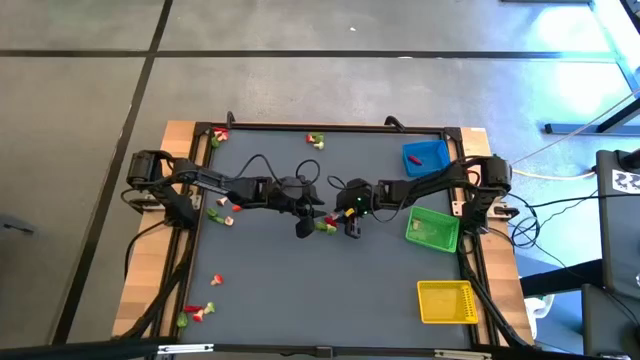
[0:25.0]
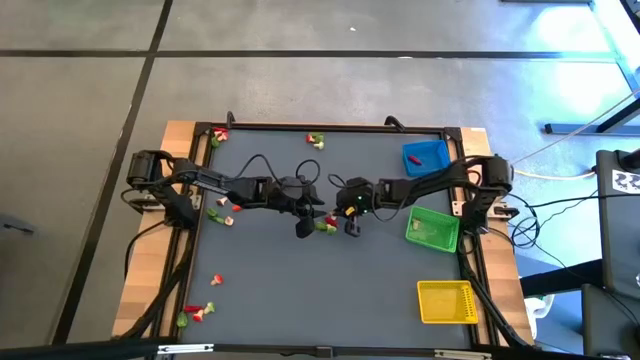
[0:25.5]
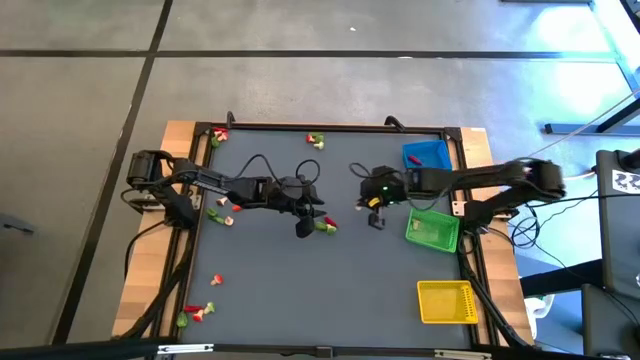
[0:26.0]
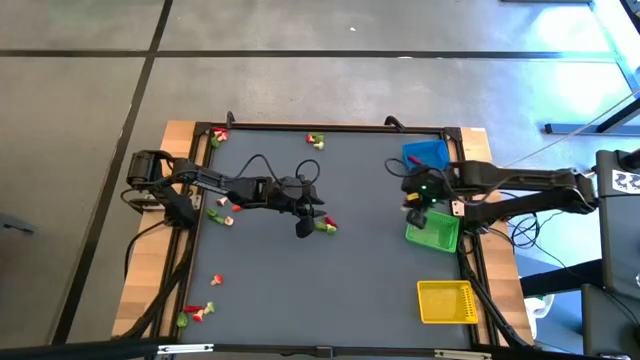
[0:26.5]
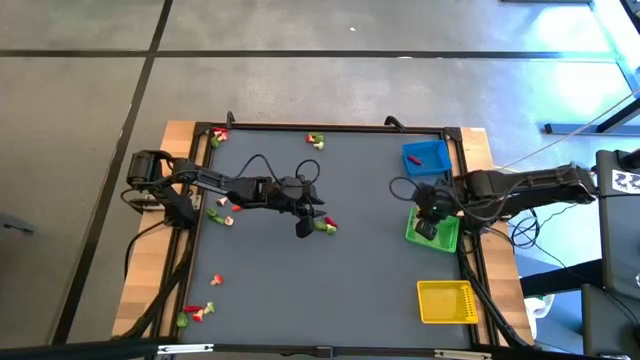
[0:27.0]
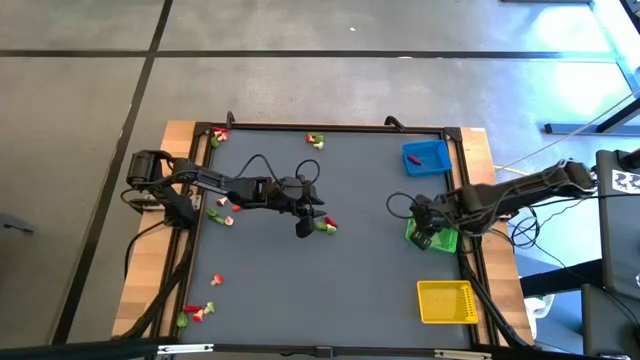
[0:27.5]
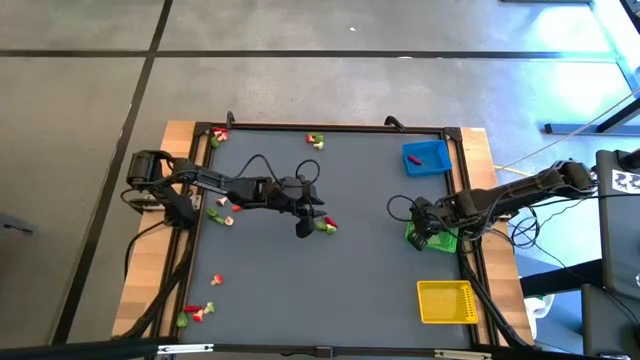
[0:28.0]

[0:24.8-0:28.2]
Task: Sort produce into baskets
Put the brown mushroom into the green basket

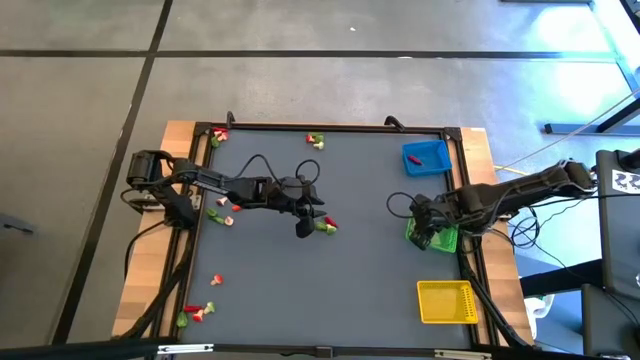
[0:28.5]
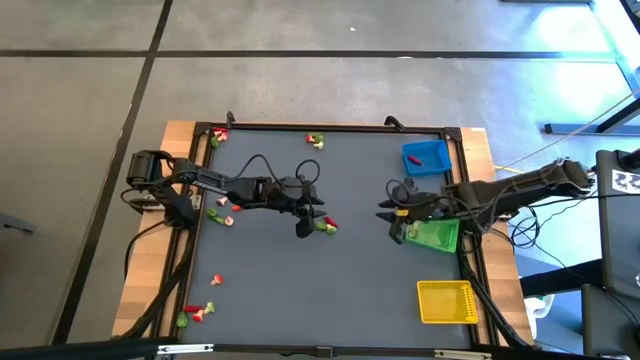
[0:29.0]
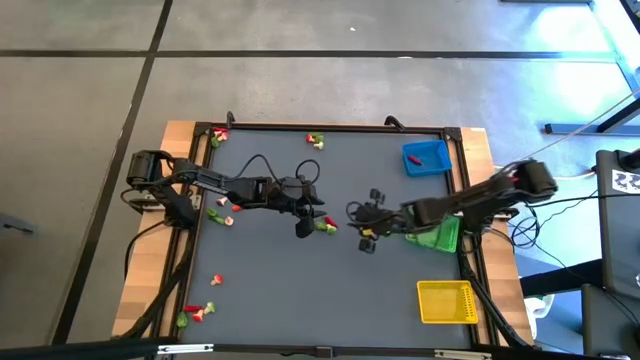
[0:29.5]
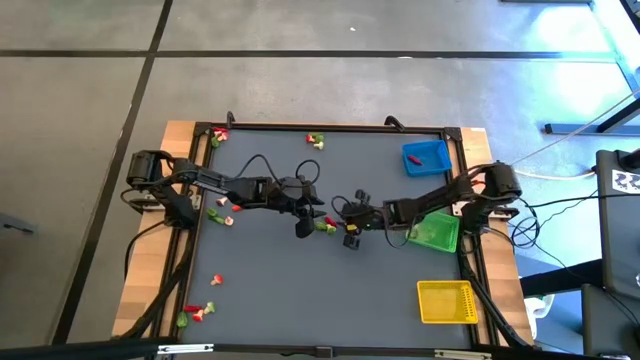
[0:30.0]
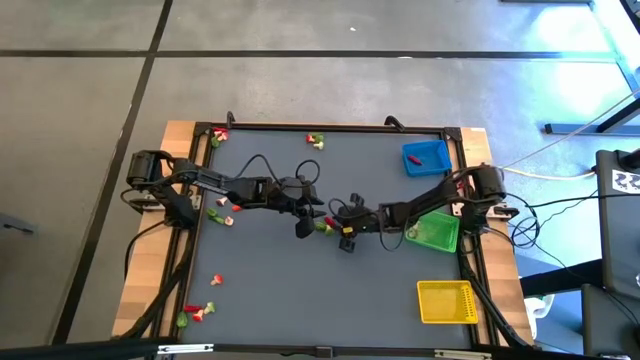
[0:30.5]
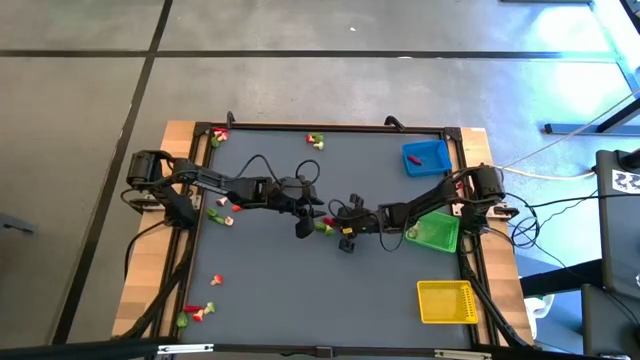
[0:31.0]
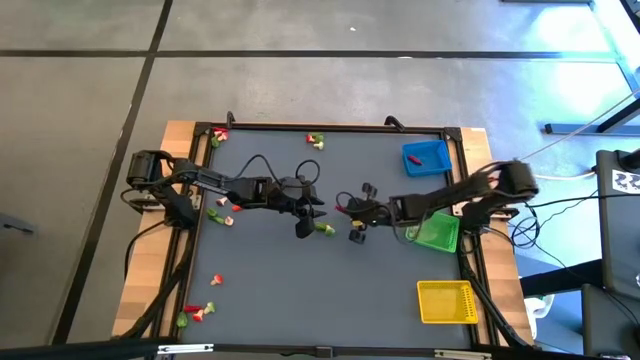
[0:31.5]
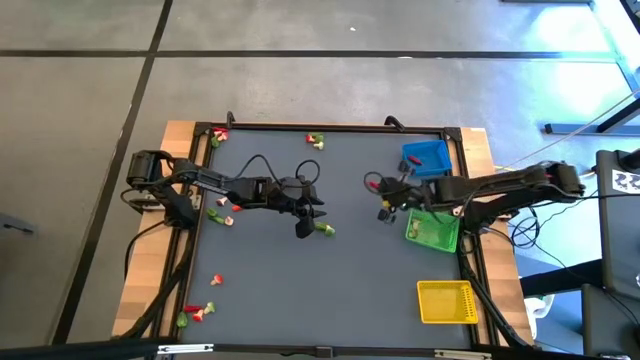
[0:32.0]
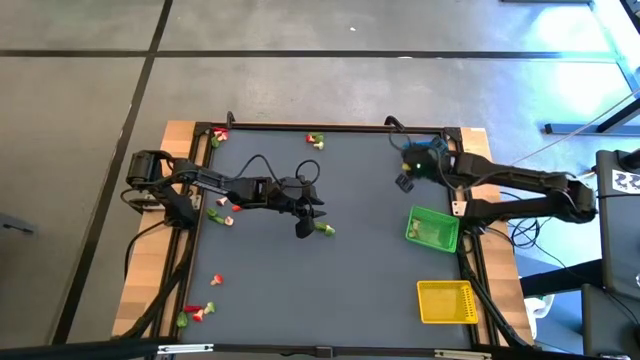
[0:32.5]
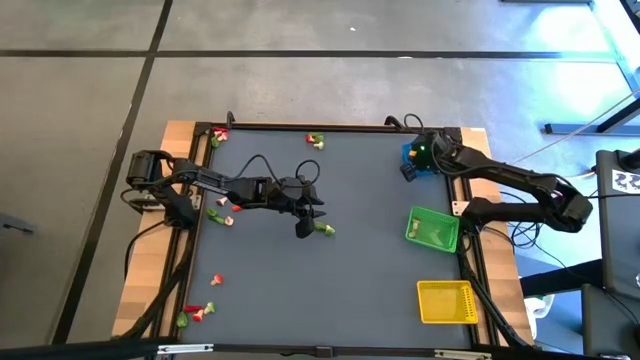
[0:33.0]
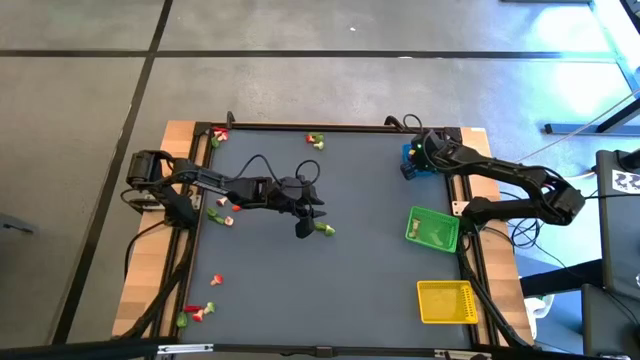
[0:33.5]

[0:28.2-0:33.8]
Put the red chili pepper into the blue basket

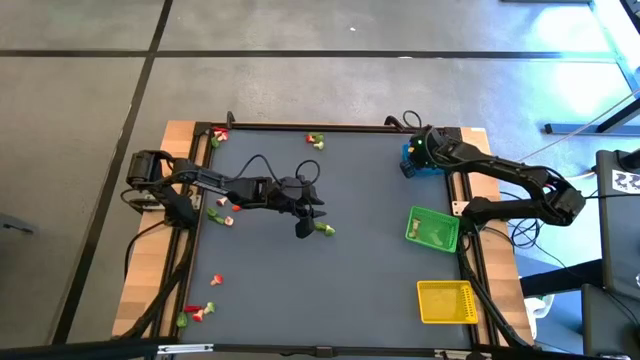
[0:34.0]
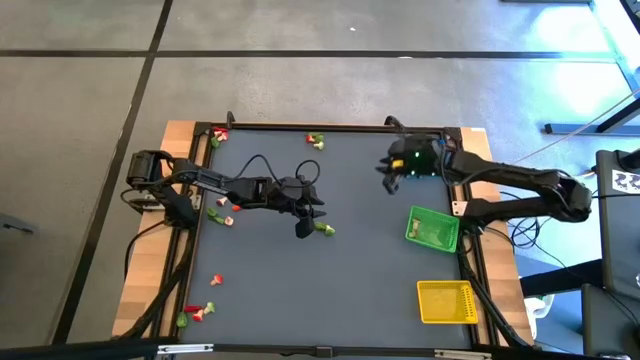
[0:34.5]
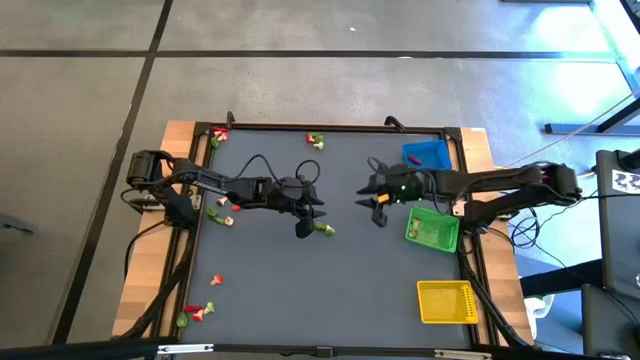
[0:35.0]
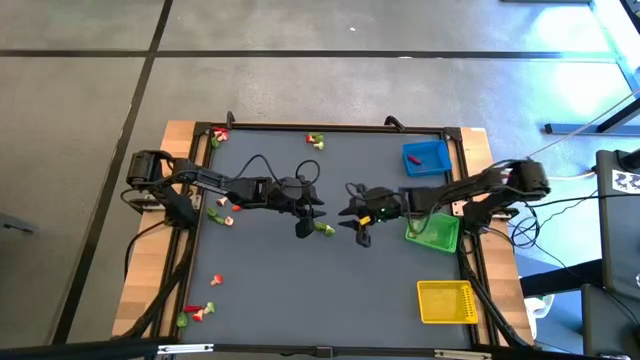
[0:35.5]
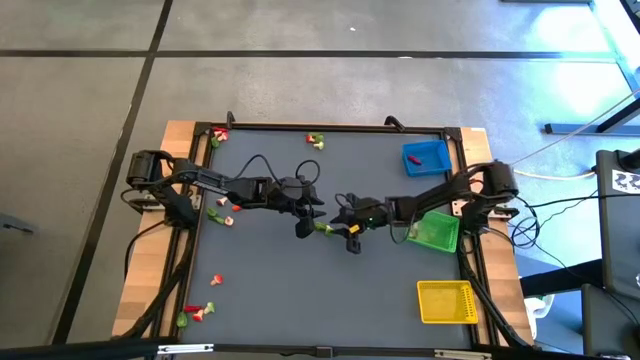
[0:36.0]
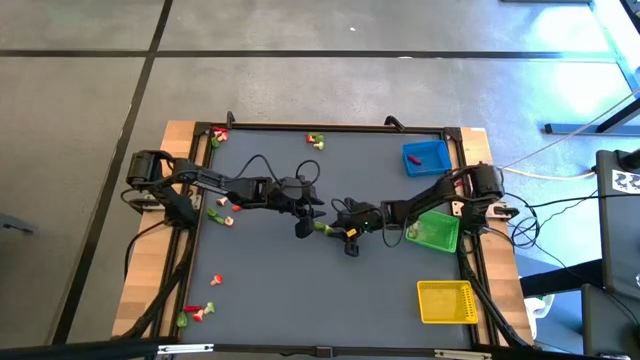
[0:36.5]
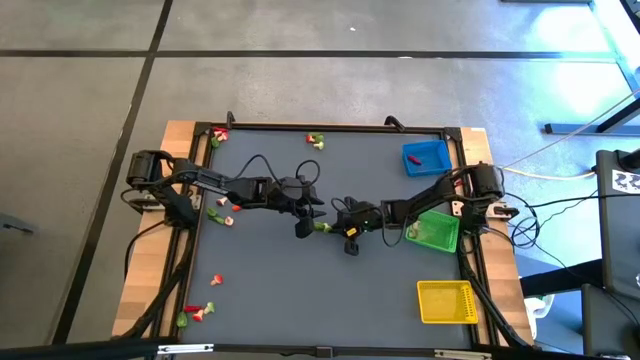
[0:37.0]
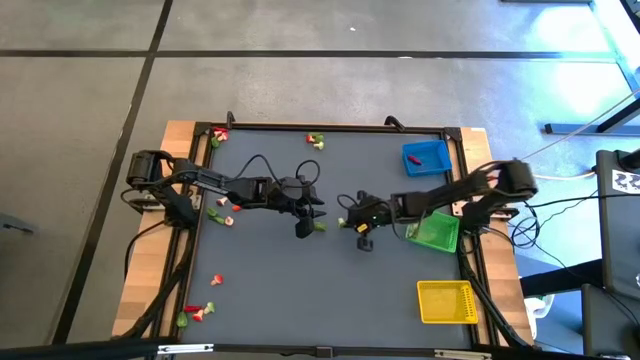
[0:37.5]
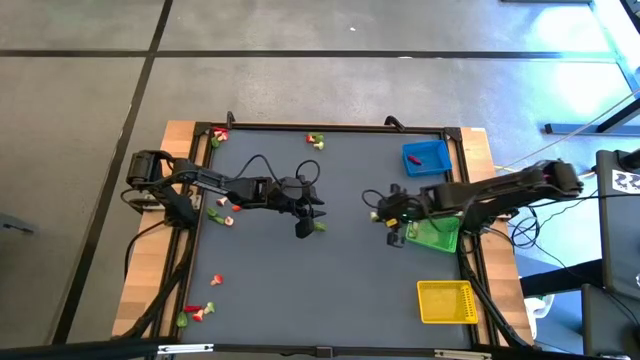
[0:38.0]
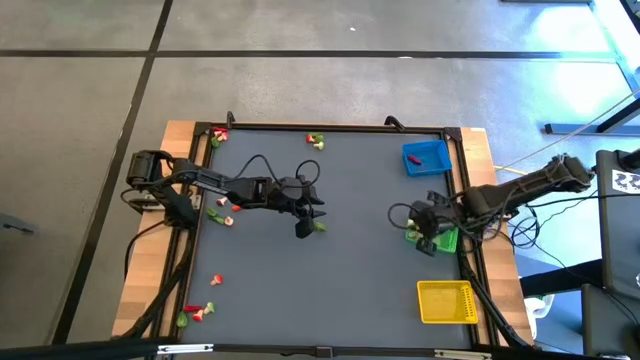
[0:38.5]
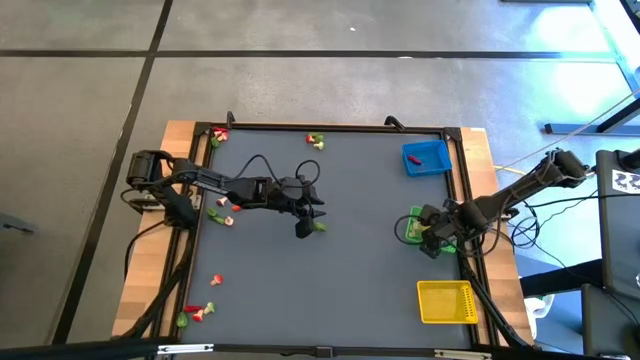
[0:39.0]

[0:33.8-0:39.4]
Put the green mushroom into the green basket

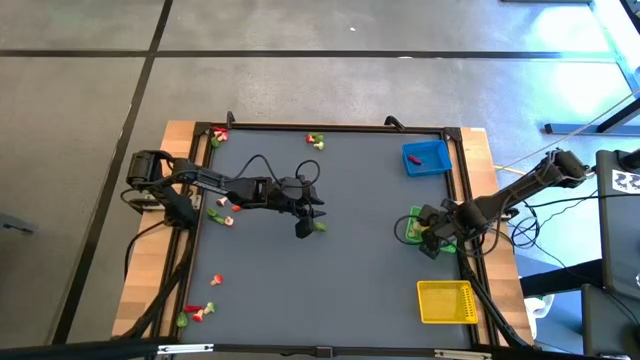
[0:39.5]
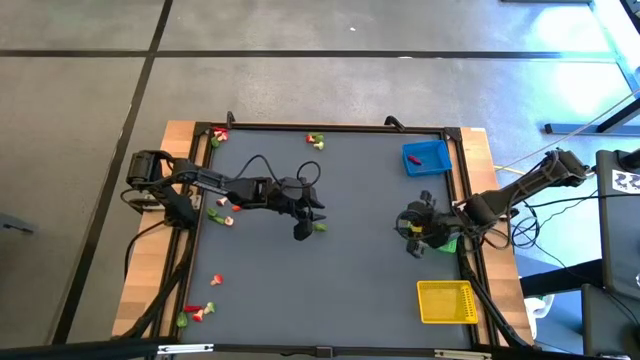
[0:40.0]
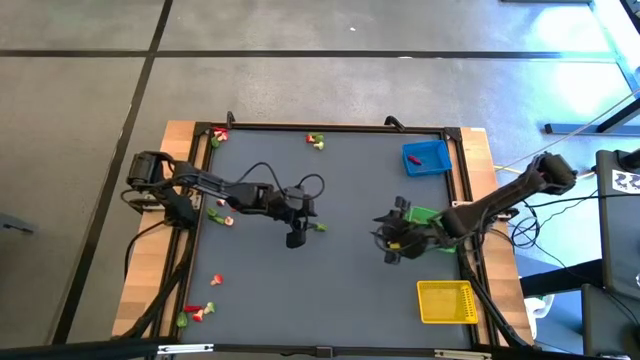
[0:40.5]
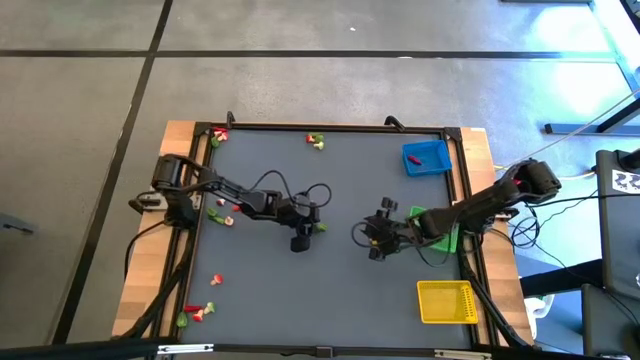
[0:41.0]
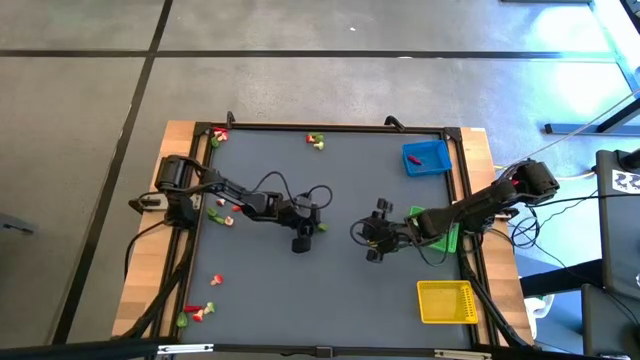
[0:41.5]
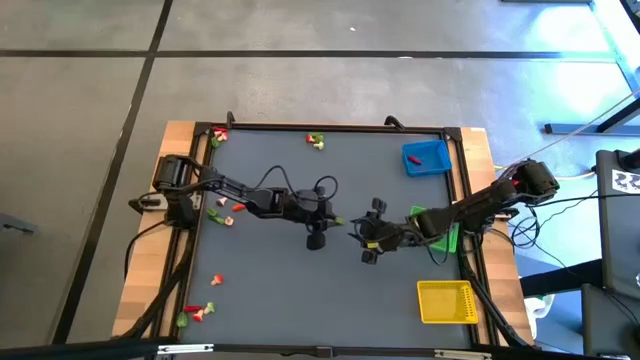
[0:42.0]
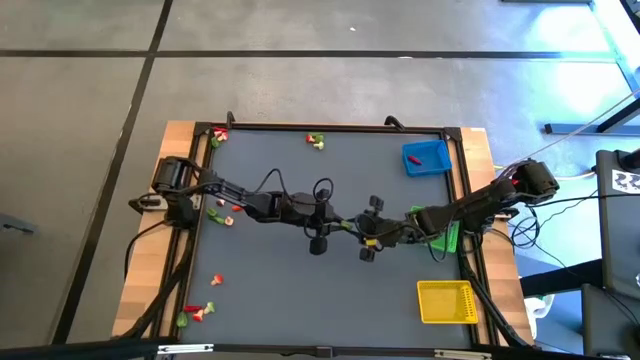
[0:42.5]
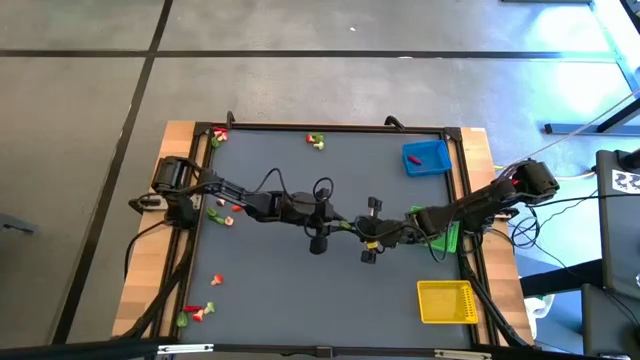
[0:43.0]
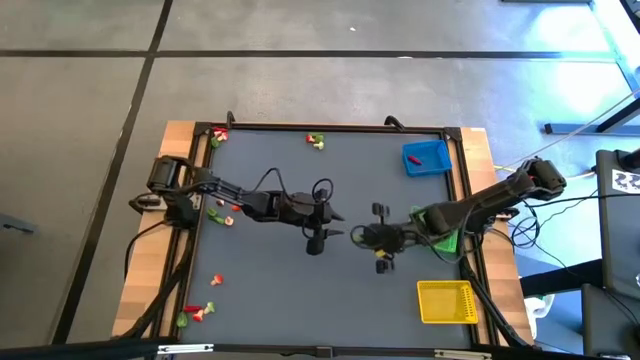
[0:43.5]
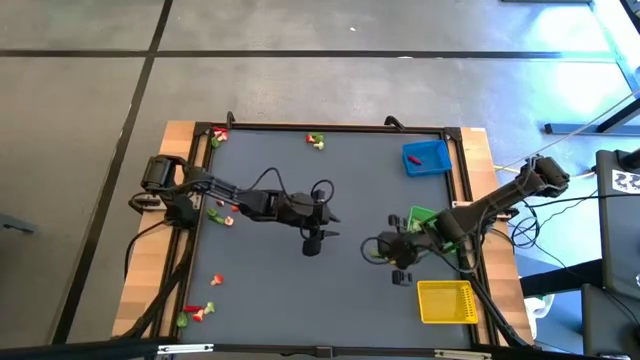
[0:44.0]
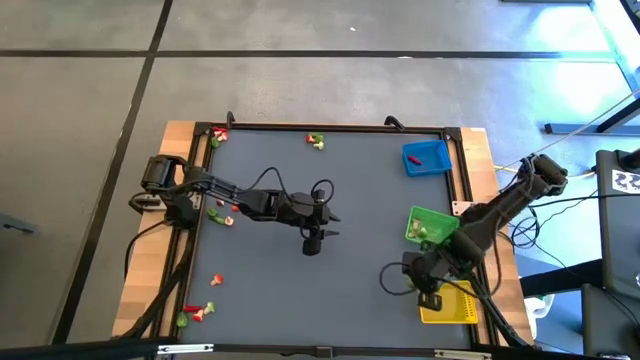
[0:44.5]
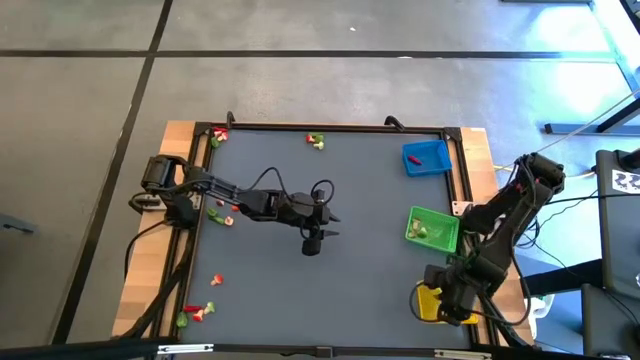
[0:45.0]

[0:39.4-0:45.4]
Put the green capsicum into the yellow basket

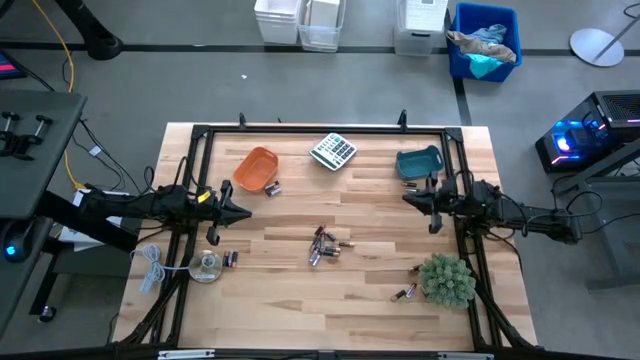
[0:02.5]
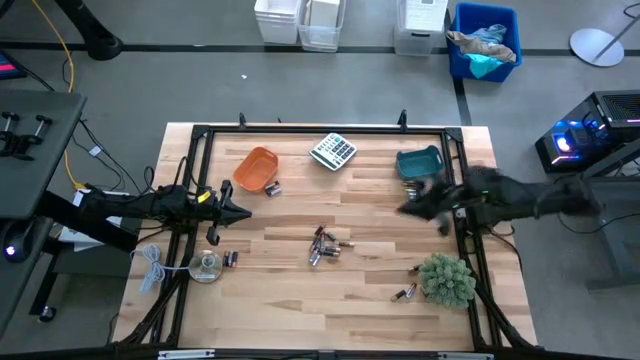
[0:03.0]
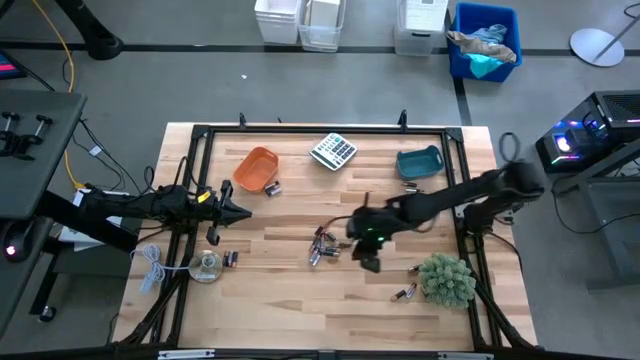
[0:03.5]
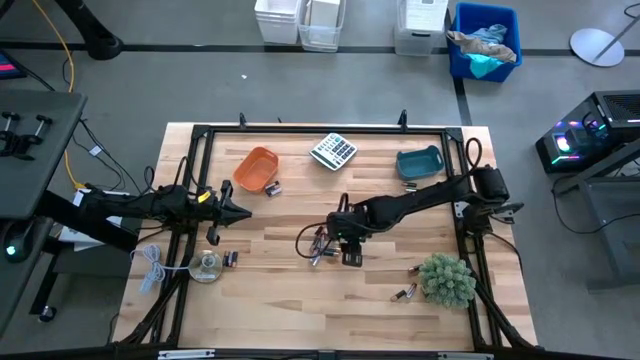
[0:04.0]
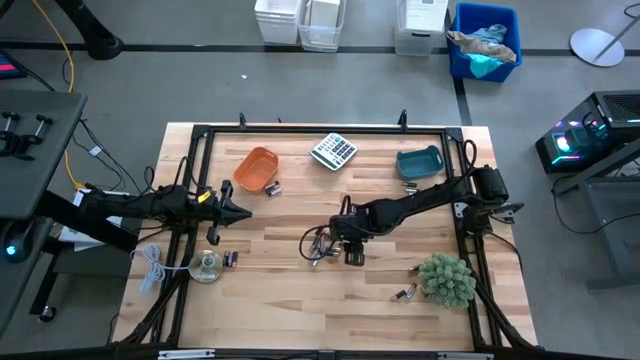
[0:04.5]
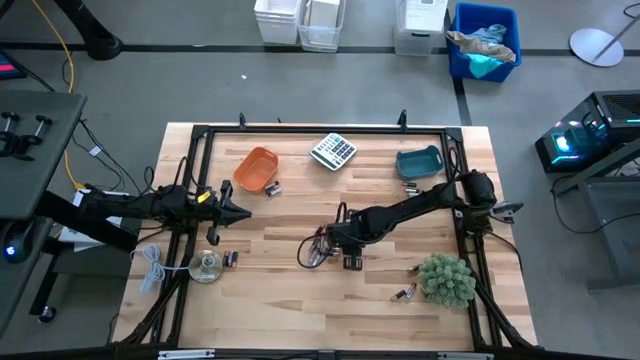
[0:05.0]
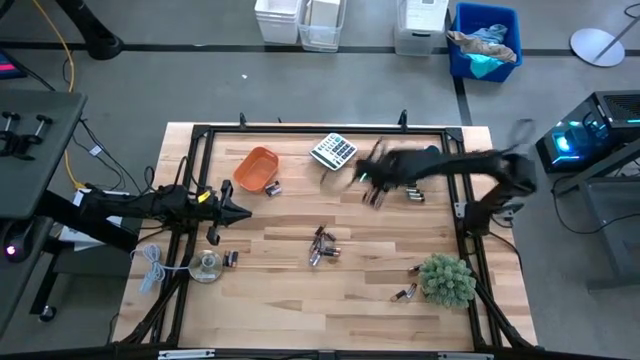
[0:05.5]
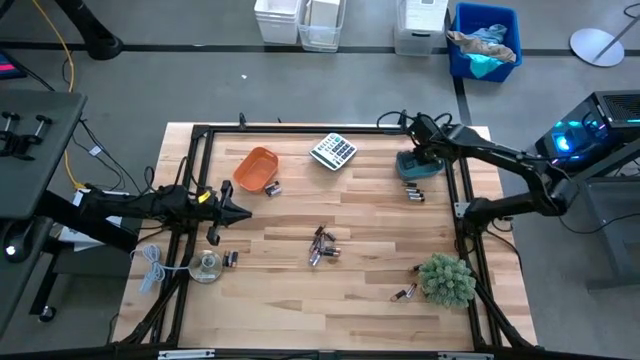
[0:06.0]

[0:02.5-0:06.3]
Task: Sort batteries
Put the golden battery into the blue bin
